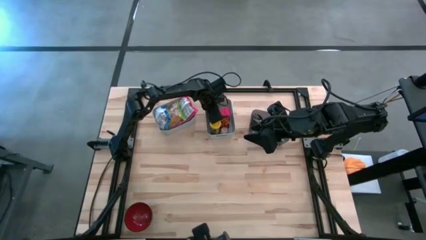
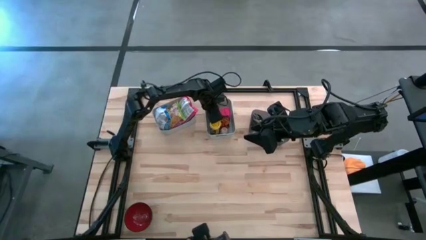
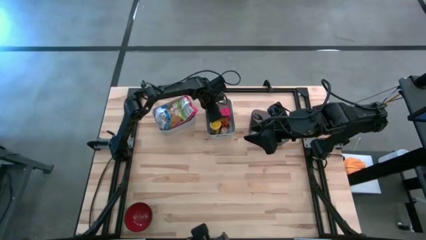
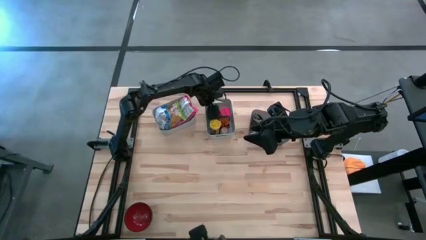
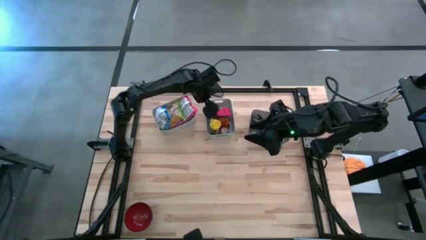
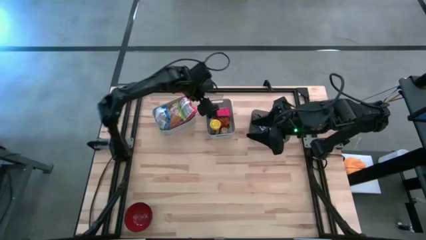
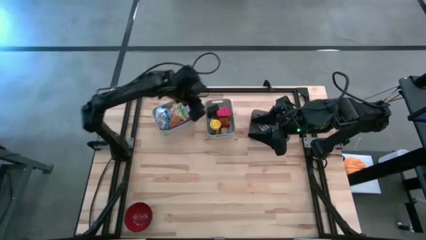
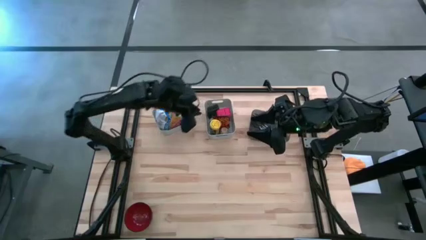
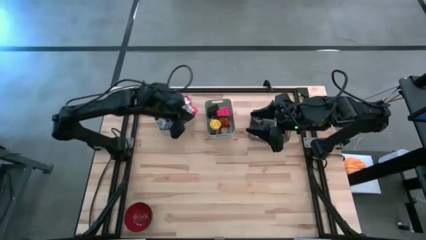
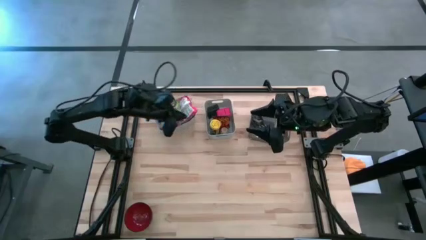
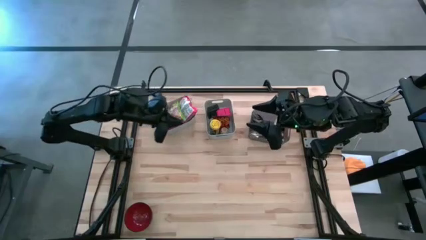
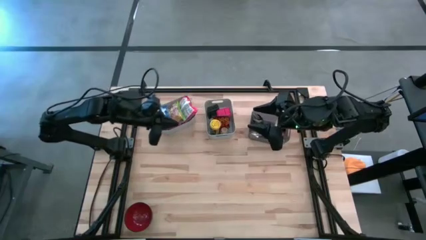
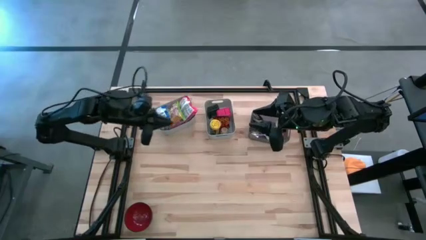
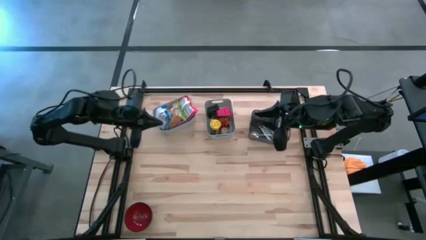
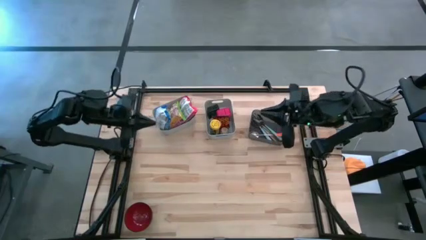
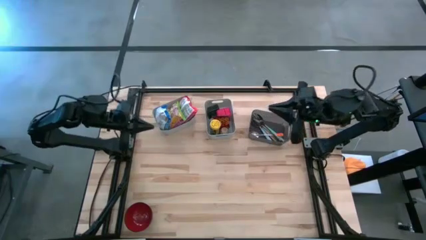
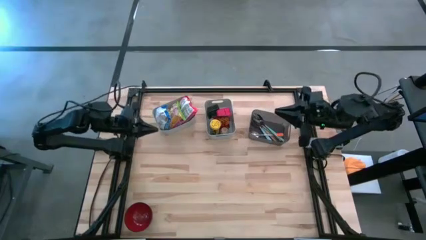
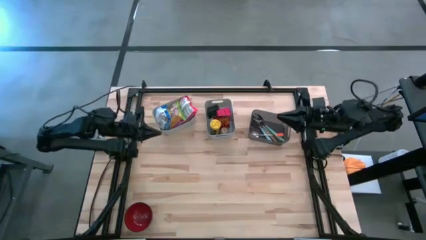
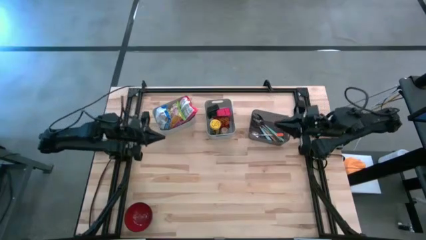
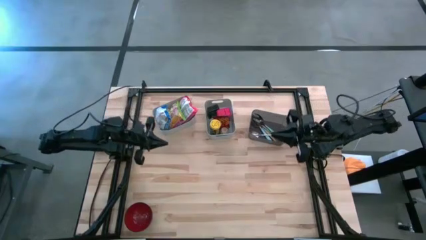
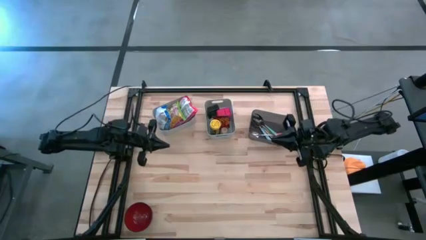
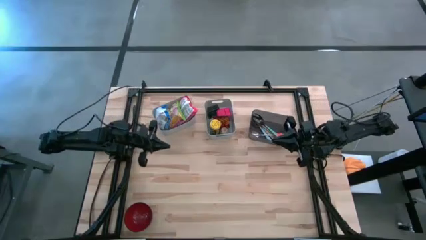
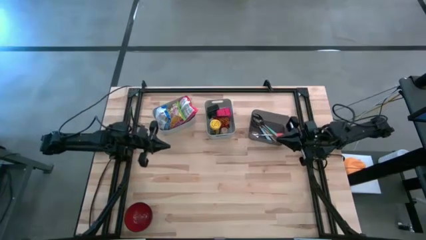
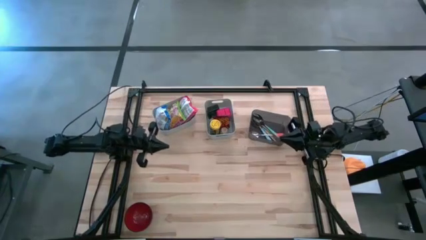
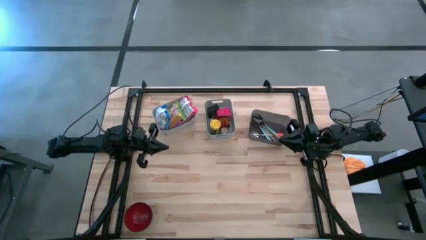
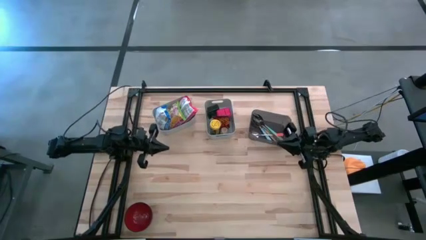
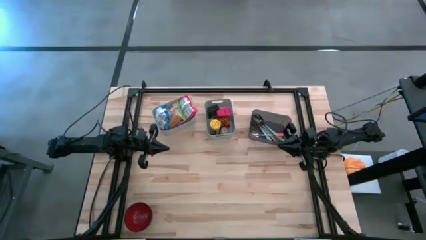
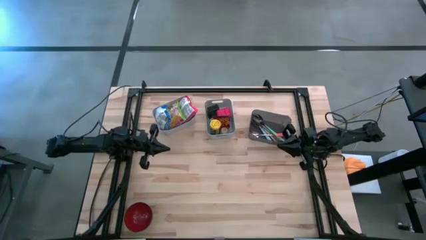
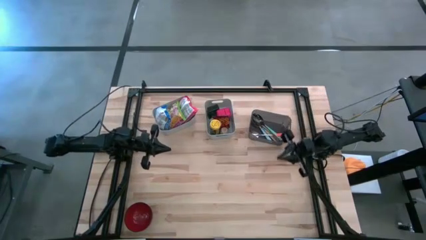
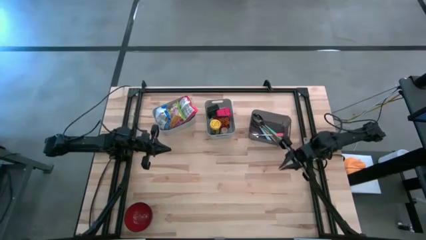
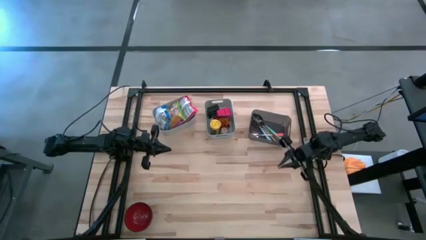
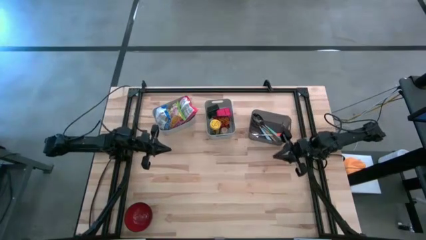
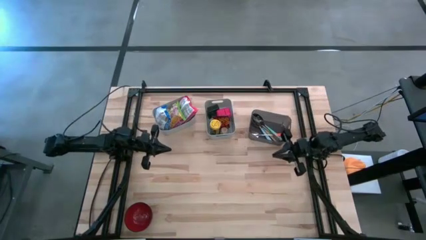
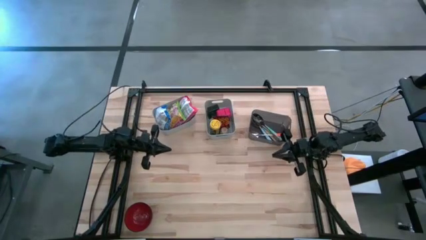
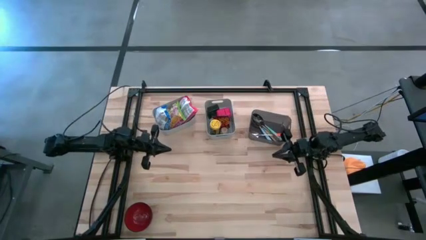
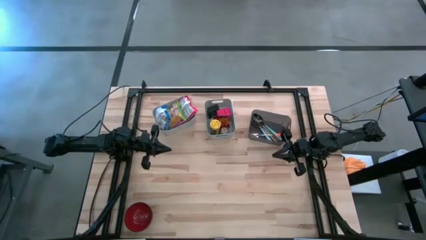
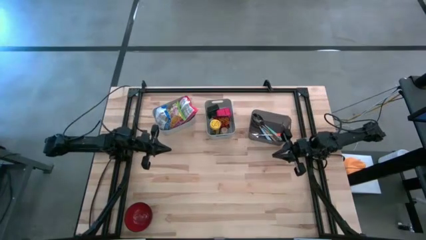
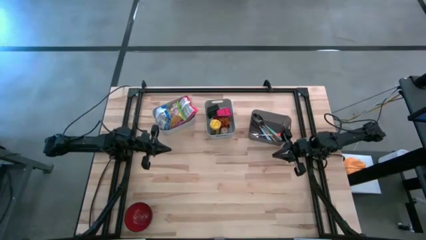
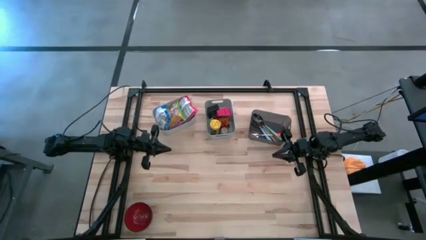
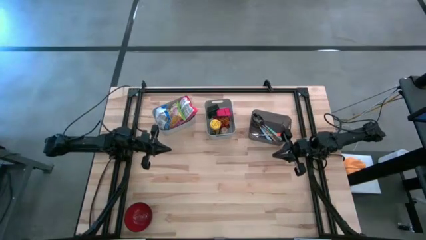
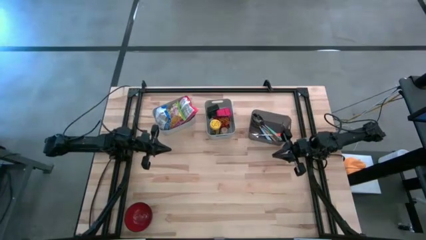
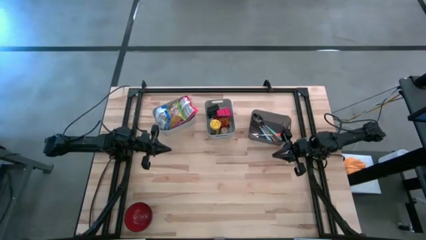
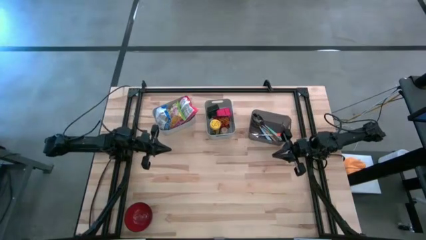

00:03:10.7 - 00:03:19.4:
Return to home position
